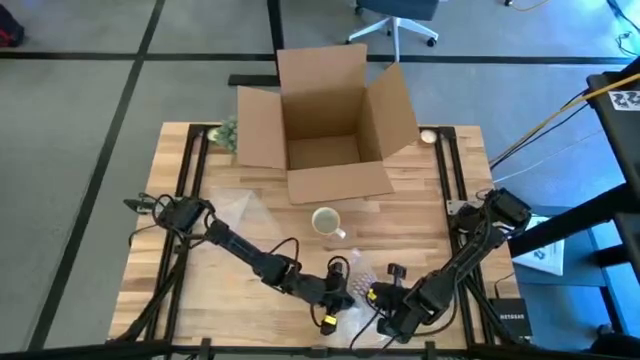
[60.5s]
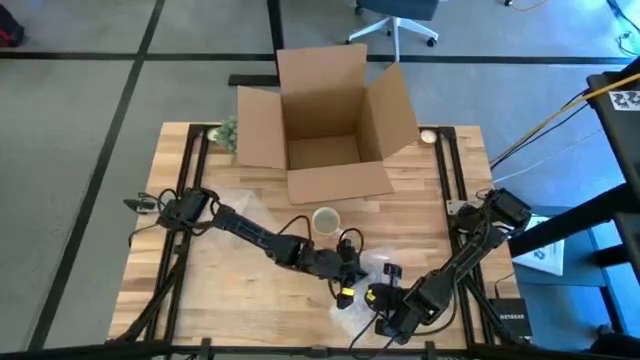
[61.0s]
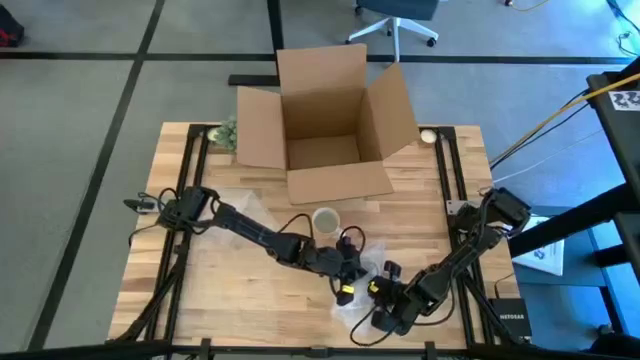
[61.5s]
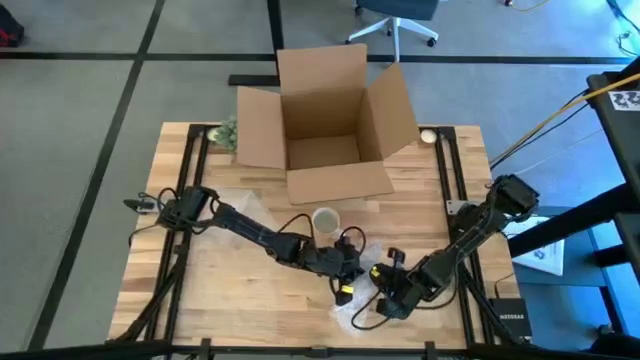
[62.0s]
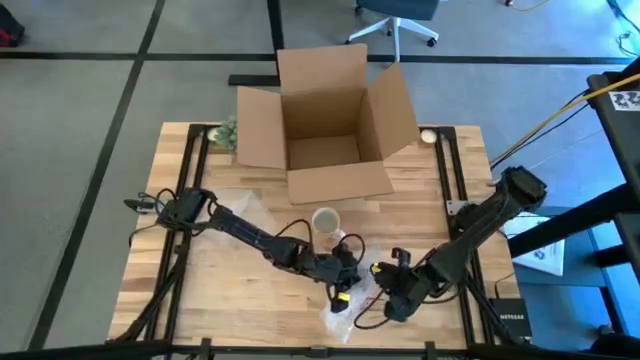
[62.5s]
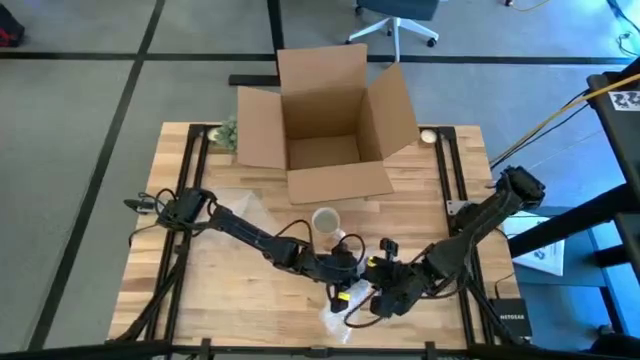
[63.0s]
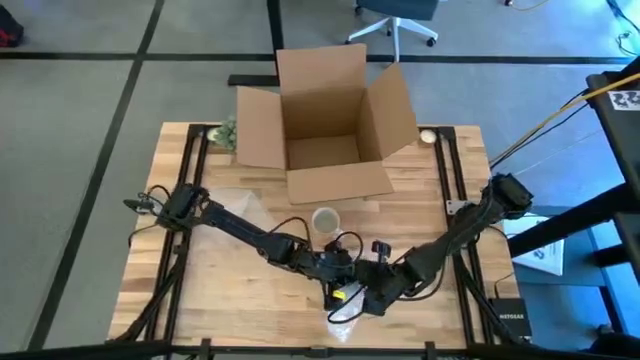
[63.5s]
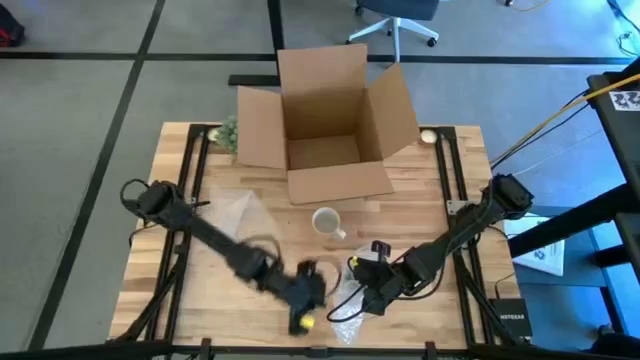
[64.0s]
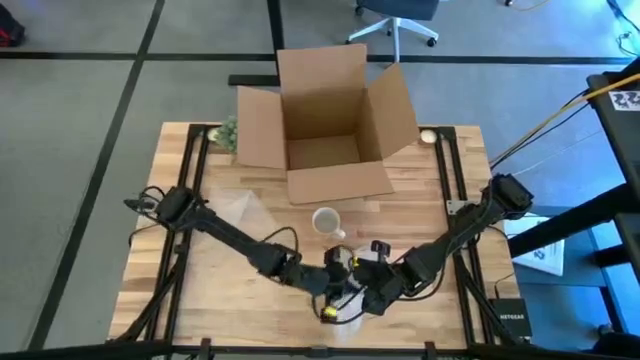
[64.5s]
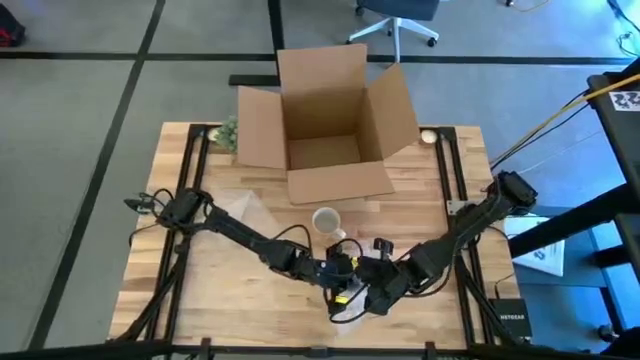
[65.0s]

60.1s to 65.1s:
Task: wrap mug
Wrap the red mug with transparent bubble wrap

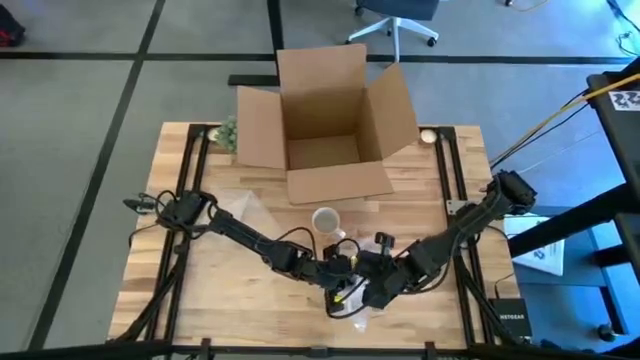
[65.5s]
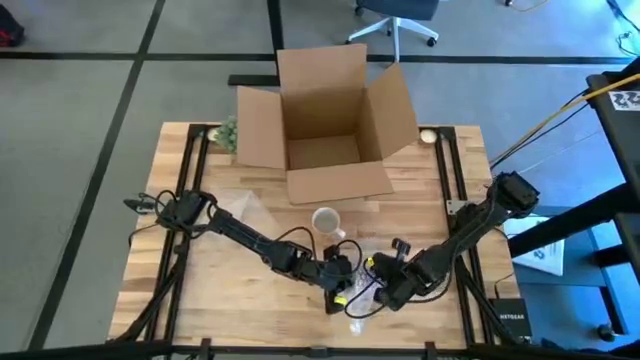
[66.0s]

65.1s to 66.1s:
Wrap the red mug with transparent bubble wrap

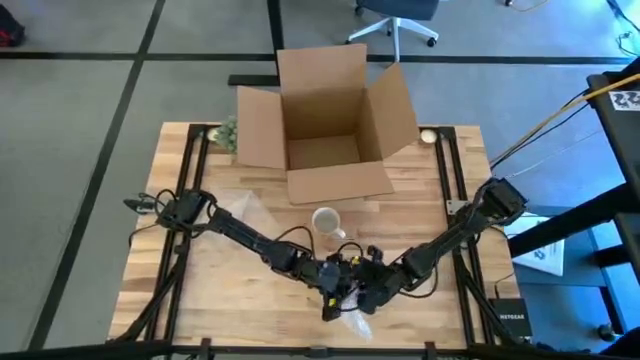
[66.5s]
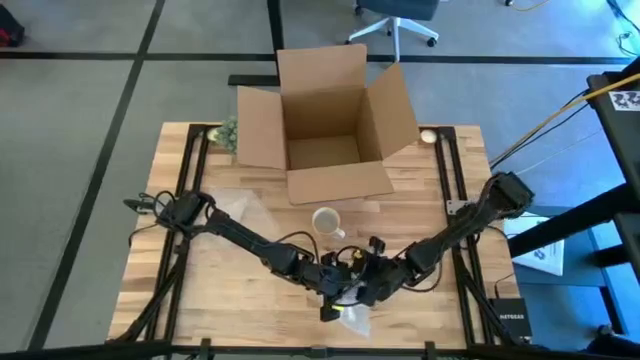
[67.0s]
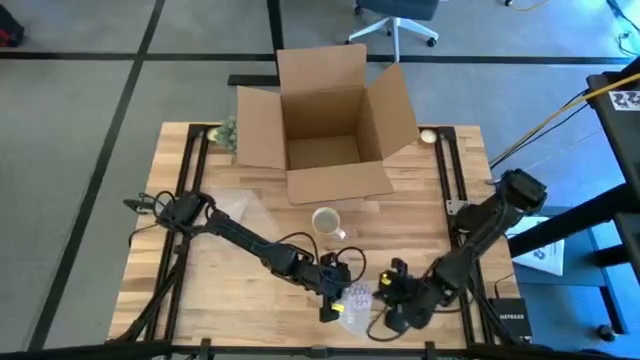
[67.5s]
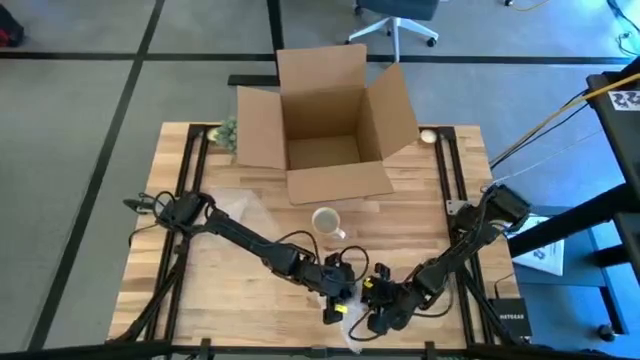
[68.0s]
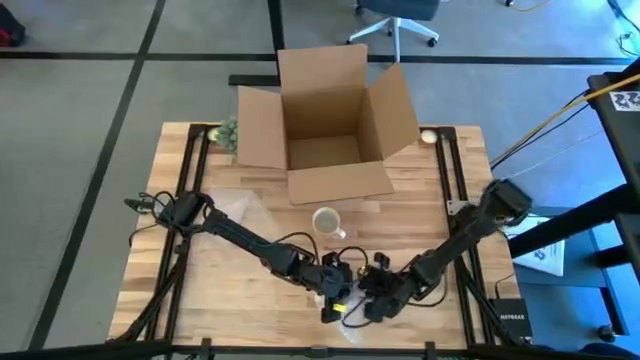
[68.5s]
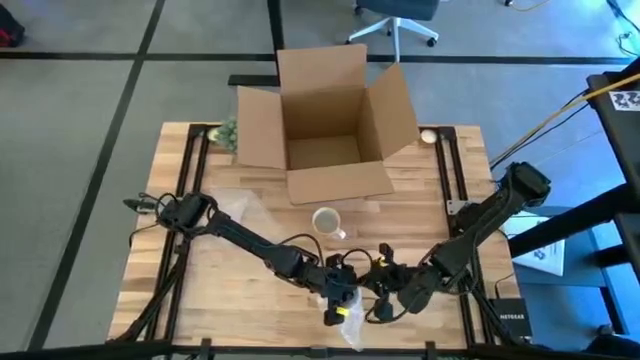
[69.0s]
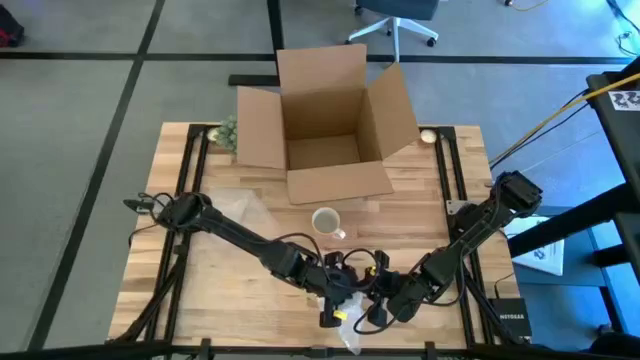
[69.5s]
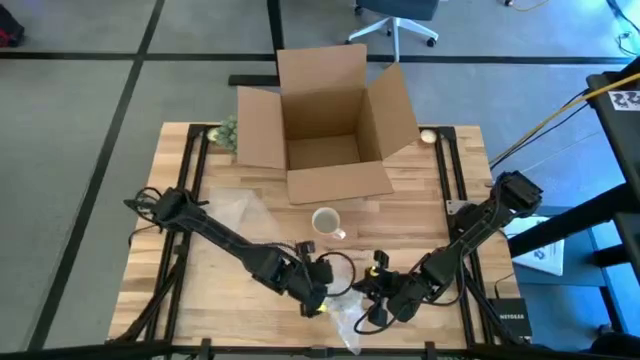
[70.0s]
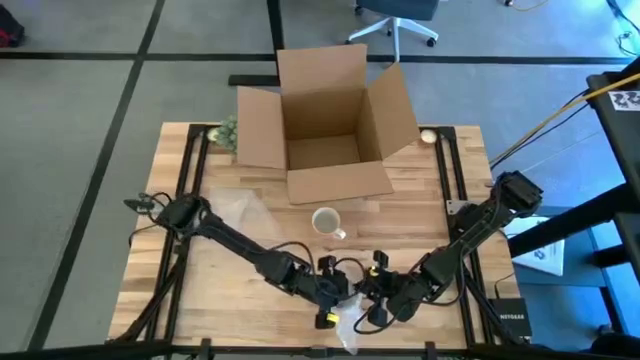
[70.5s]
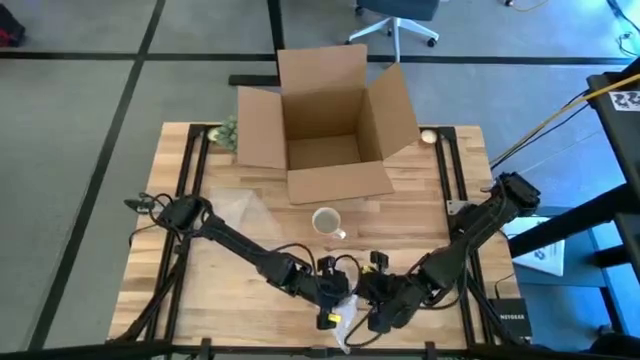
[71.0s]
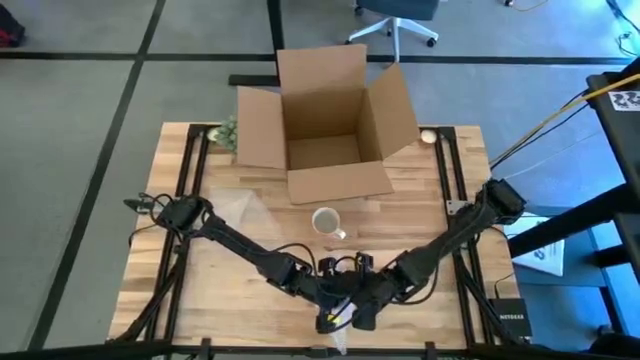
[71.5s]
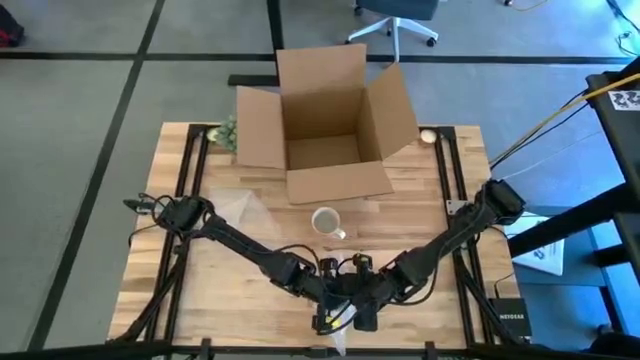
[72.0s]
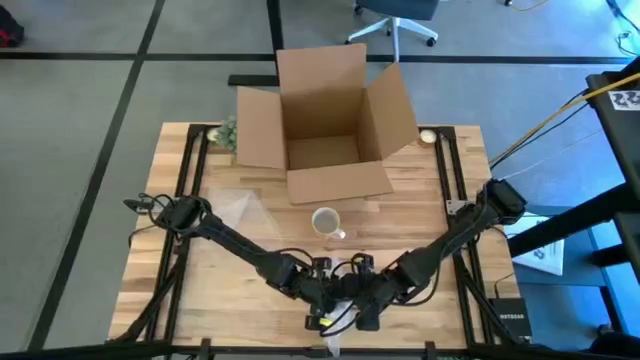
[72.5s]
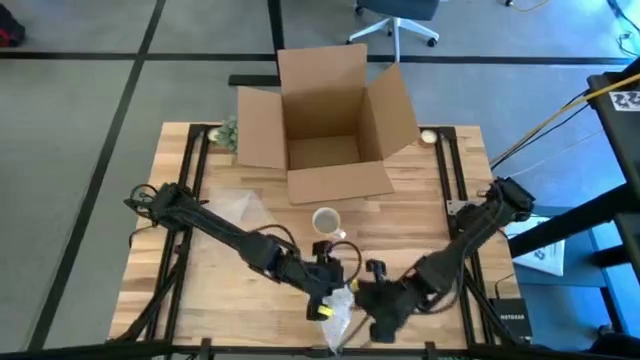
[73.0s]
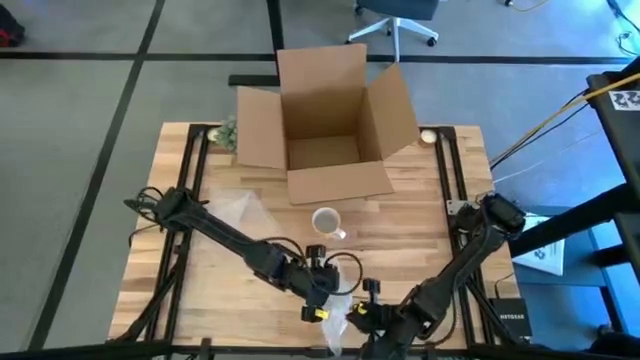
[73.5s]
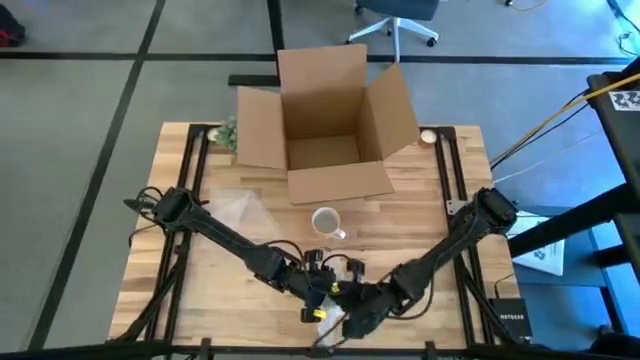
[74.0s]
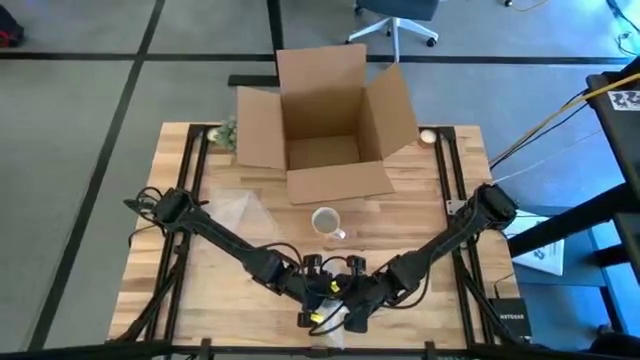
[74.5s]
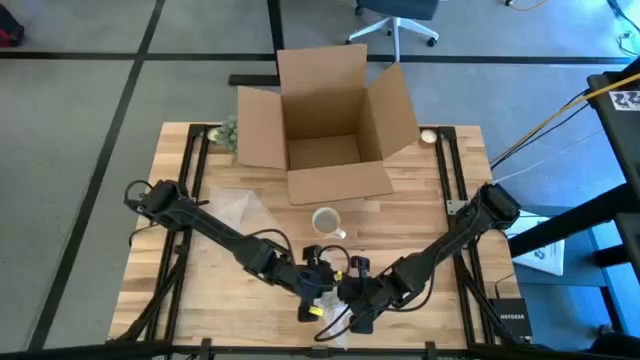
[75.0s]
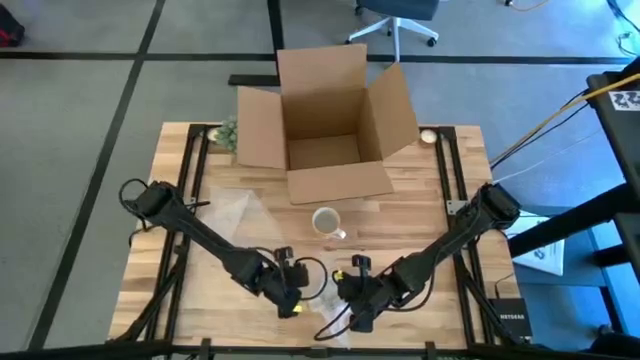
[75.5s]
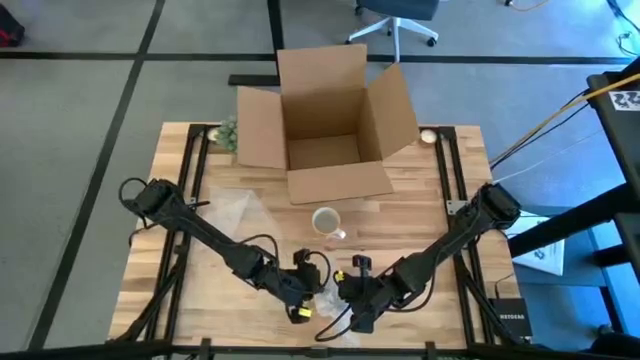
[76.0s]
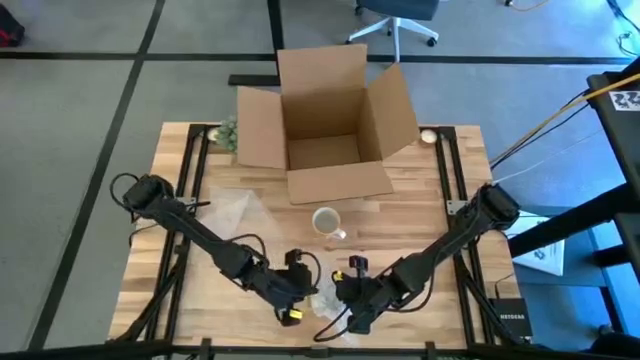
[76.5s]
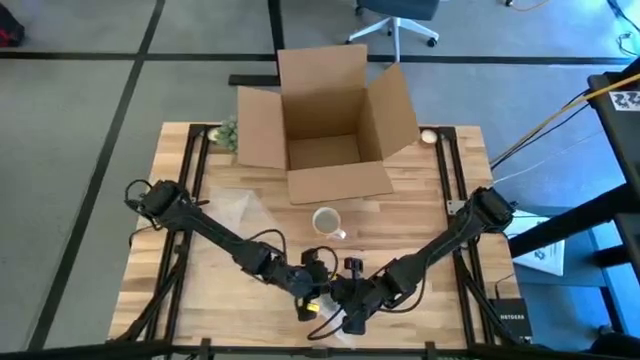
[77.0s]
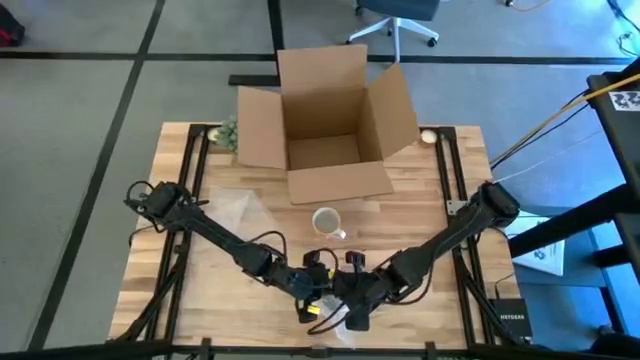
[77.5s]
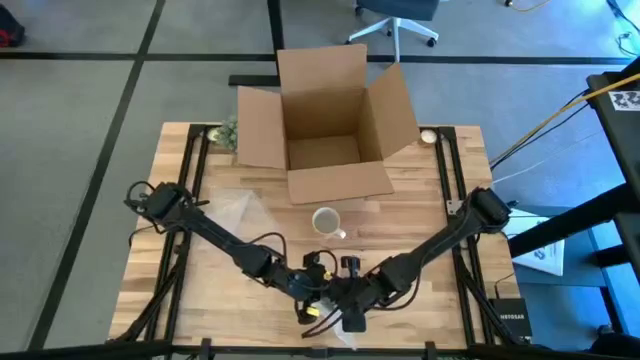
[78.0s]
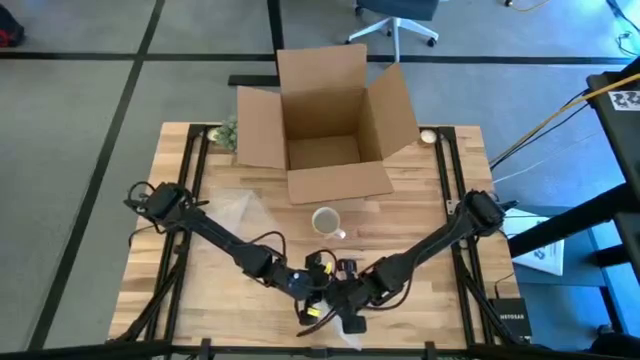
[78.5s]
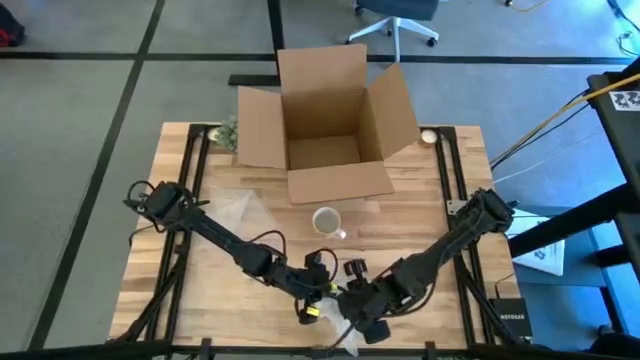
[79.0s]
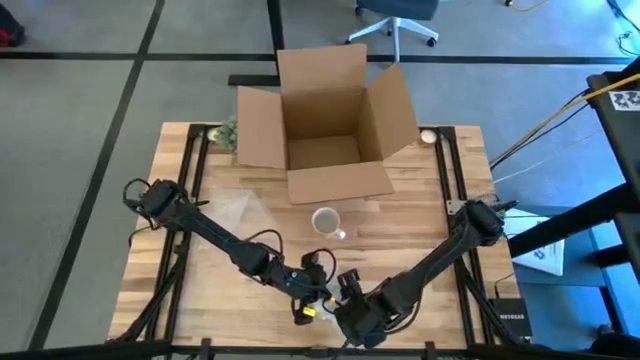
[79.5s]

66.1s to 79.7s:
Wrap the red mug with transparent bubble wrap

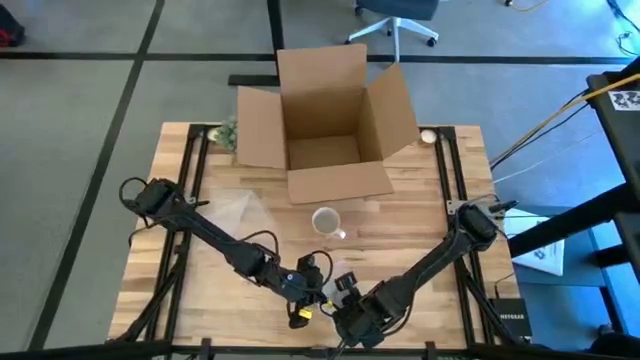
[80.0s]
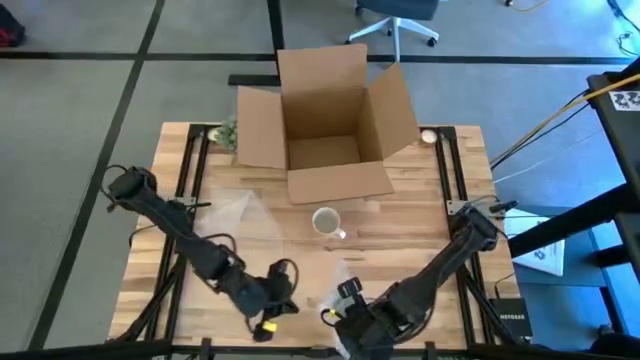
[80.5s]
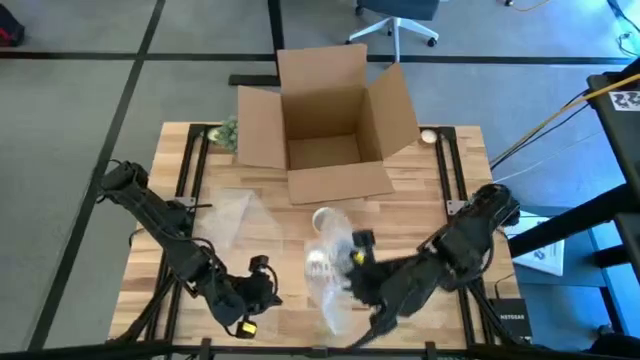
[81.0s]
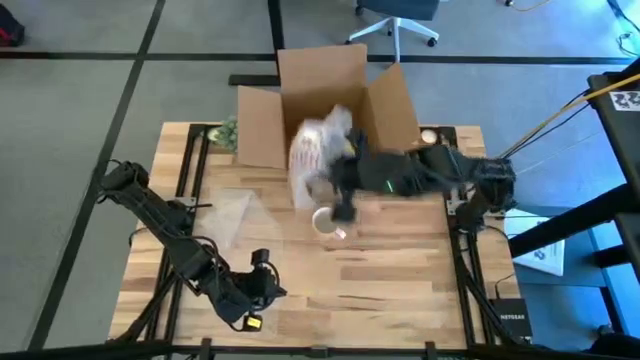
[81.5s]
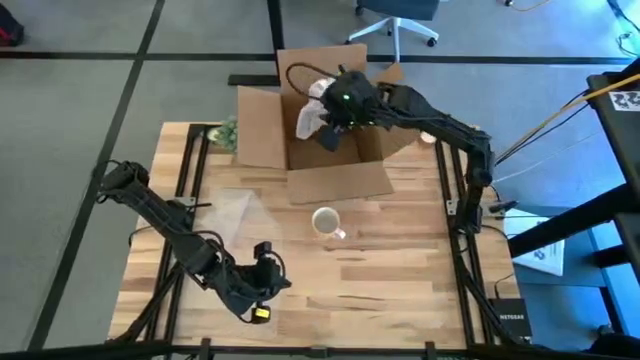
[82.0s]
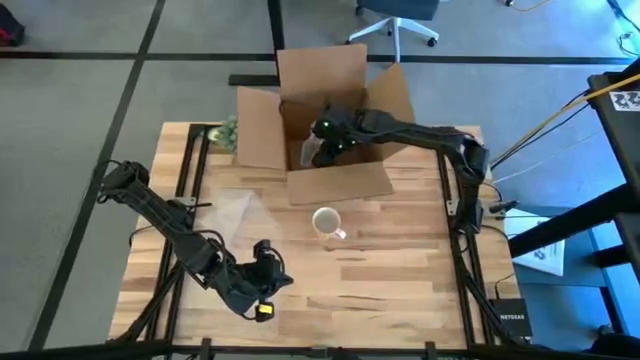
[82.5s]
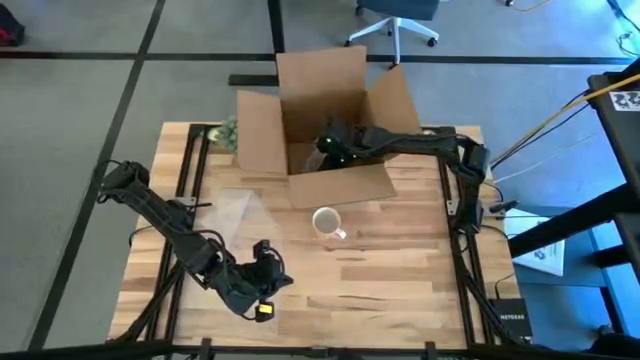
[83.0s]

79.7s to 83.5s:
Put the wrapped red mug into the box
